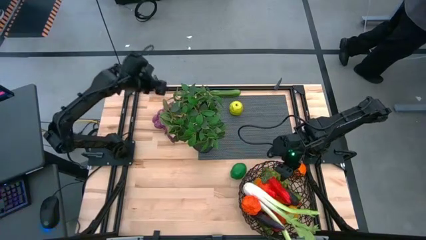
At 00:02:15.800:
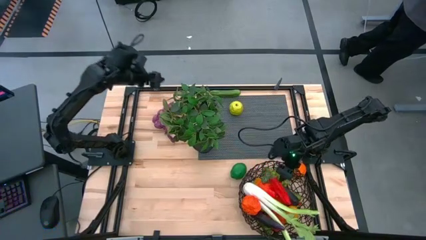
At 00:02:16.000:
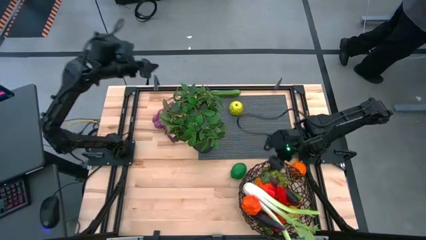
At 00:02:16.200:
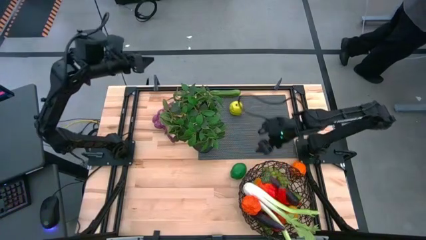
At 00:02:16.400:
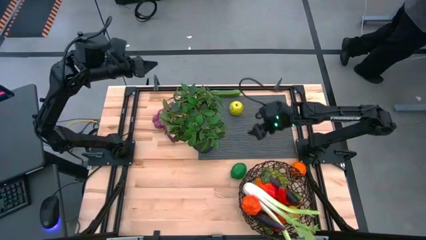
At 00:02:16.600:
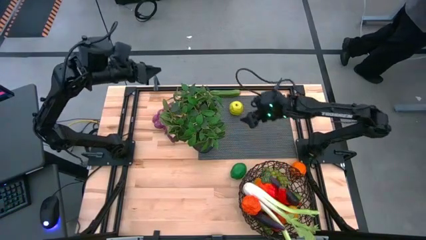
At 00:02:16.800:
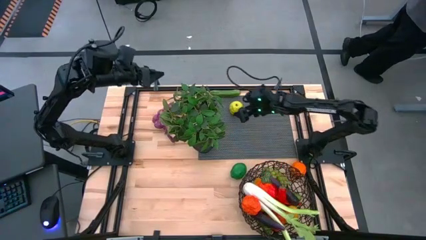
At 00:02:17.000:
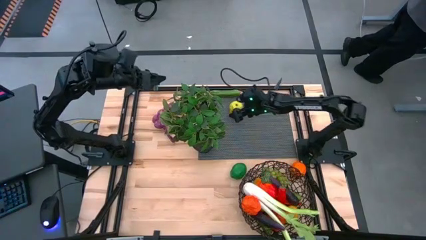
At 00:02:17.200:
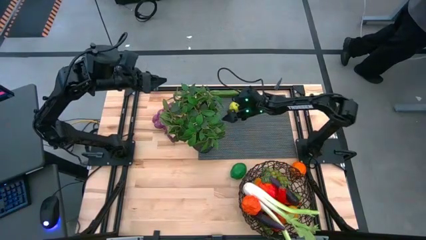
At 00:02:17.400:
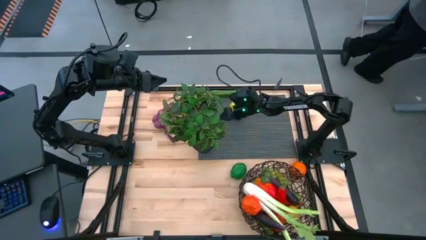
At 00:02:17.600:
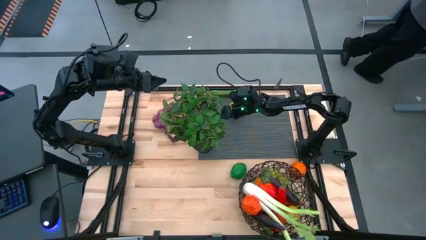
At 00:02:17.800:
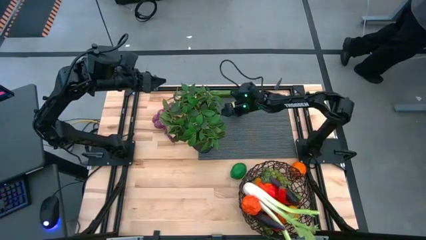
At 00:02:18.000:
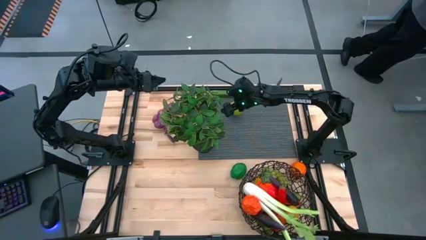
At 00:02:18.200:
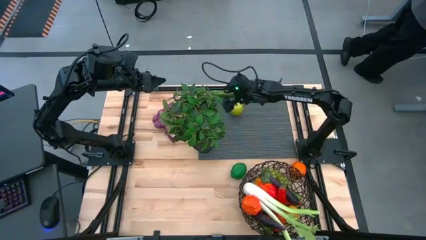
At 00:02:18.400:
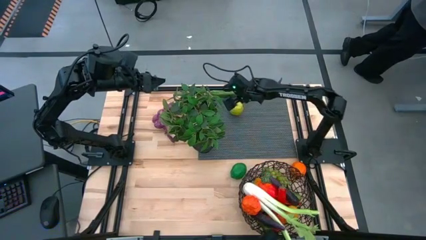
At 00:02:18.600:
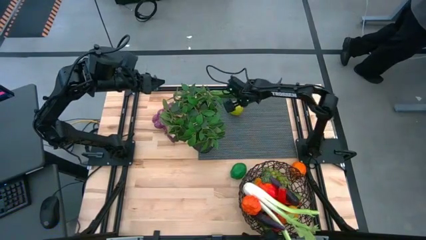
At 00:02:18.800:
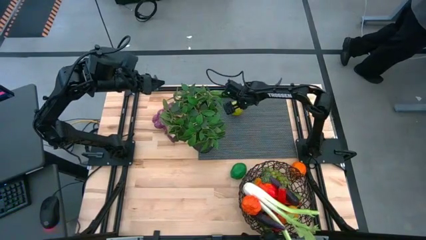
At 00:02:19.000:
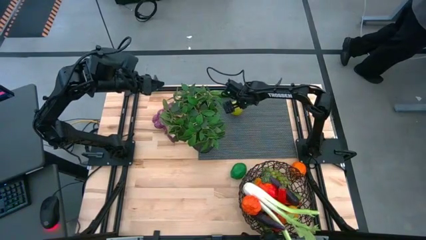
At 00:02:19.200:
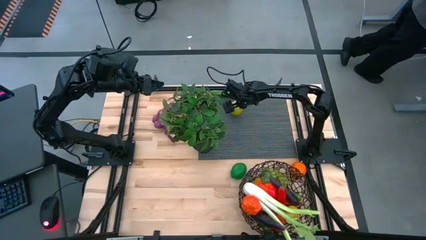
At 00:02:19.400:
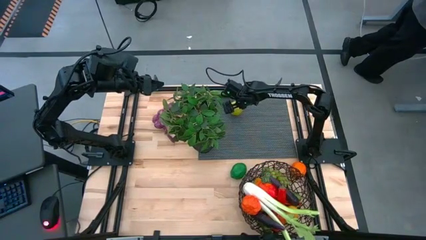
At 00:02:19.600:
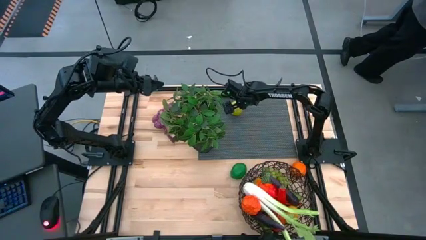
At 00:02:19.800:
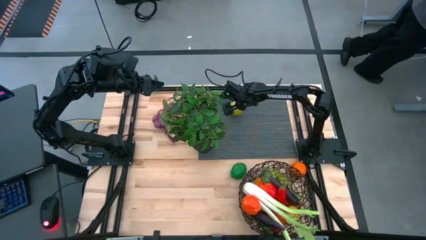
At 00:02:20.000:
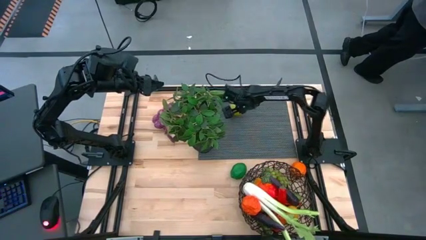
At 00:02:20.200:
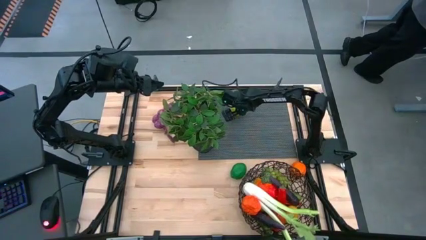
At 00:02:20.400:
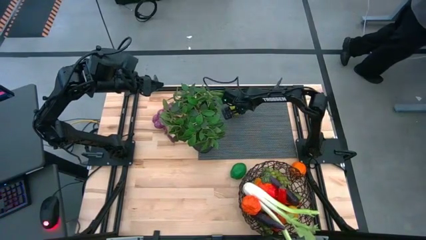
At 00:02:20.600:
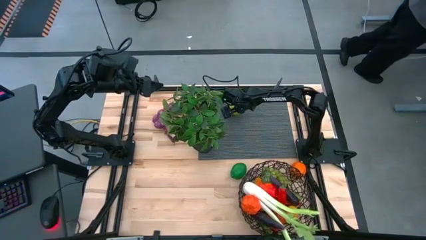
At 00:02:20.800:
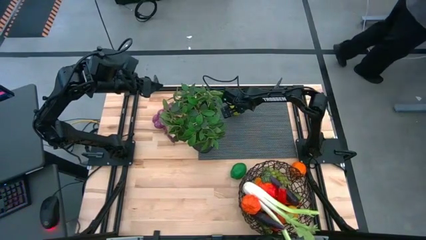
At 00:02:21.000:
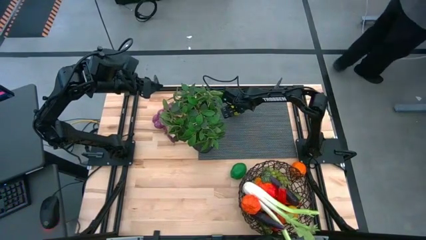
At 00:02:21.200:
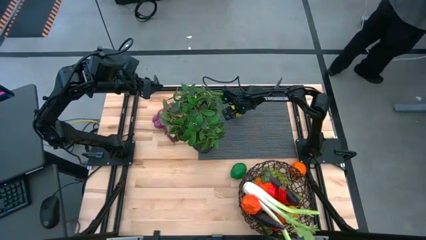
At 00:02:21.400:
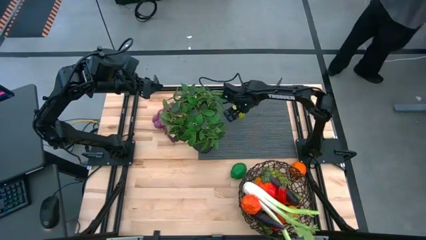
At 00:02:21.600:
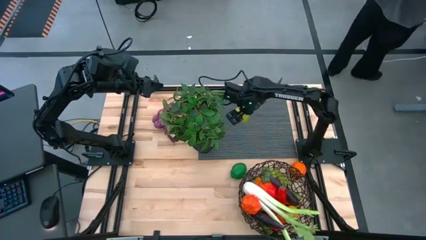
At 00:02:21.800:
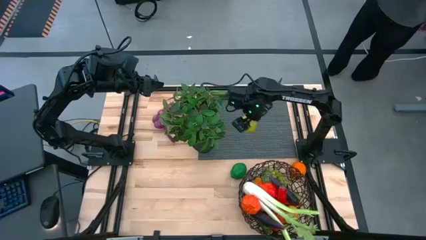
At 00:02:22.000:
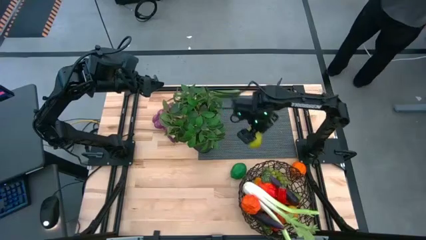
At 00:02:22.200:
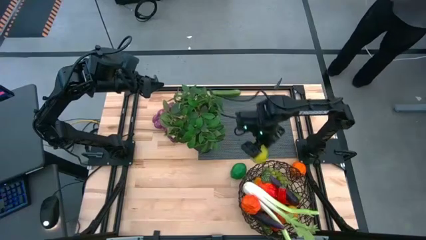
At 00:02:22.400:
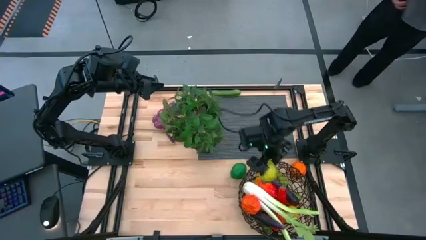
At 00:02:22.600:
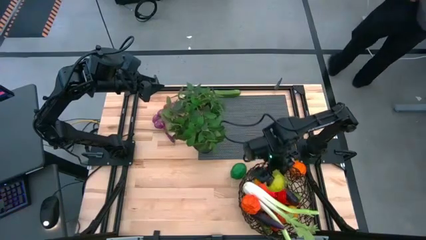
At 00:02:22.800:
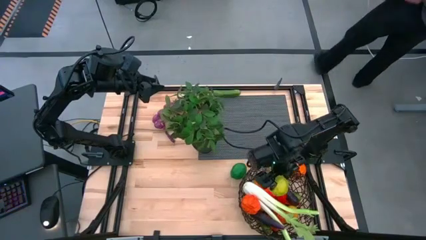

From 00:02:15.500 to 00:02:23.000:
Task: Build produce basket
Put the yellow lemon into the brown wire basket

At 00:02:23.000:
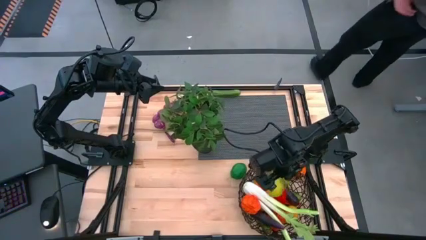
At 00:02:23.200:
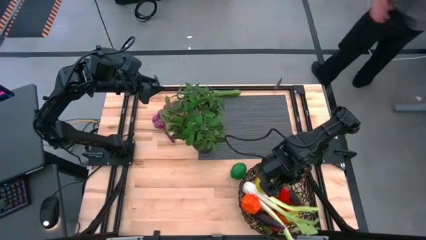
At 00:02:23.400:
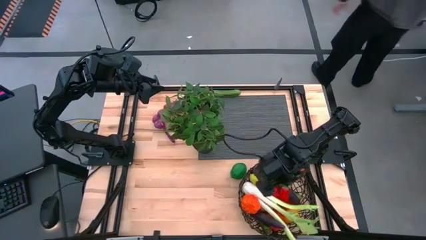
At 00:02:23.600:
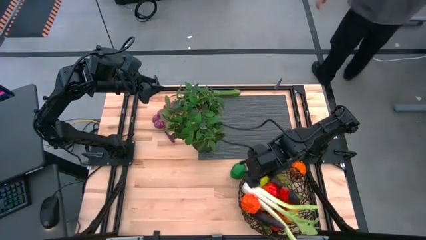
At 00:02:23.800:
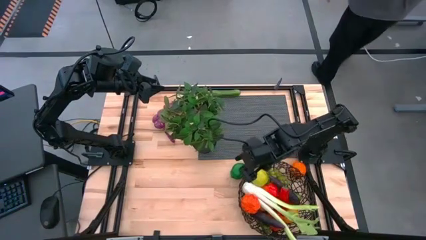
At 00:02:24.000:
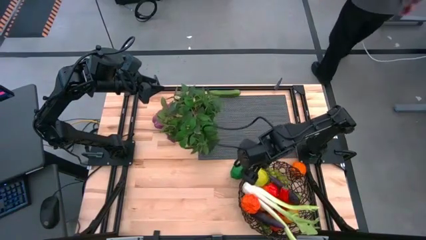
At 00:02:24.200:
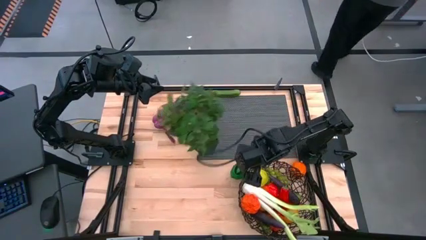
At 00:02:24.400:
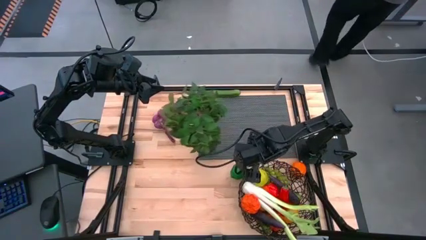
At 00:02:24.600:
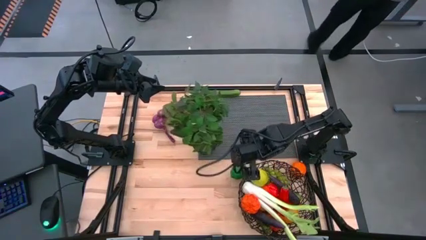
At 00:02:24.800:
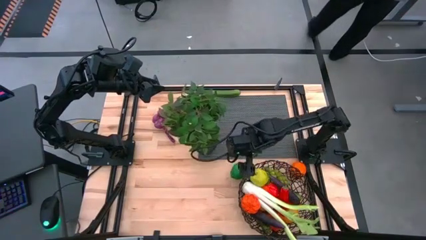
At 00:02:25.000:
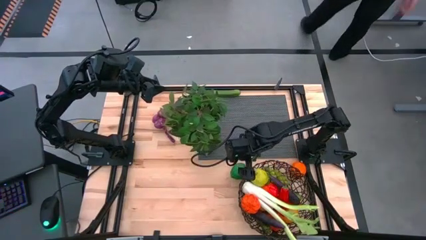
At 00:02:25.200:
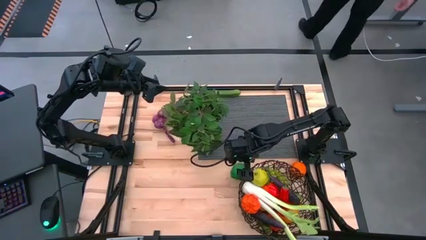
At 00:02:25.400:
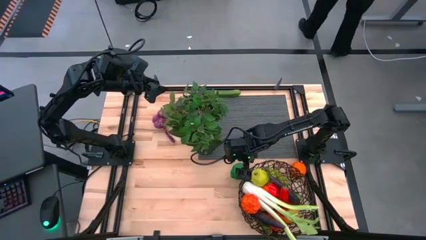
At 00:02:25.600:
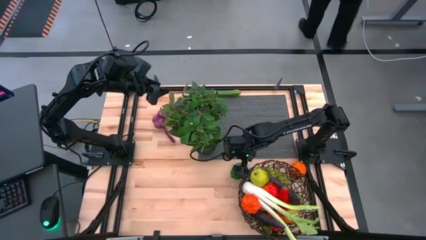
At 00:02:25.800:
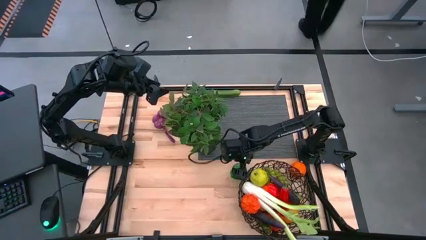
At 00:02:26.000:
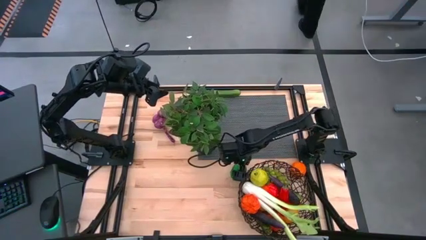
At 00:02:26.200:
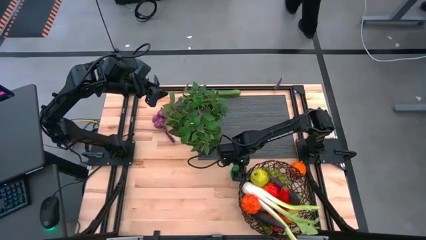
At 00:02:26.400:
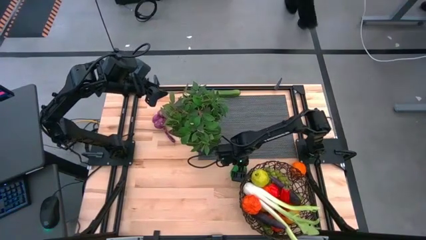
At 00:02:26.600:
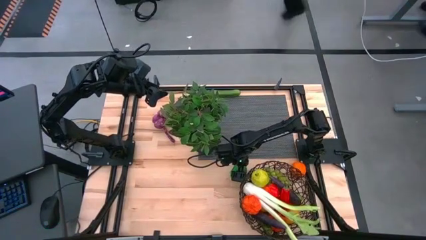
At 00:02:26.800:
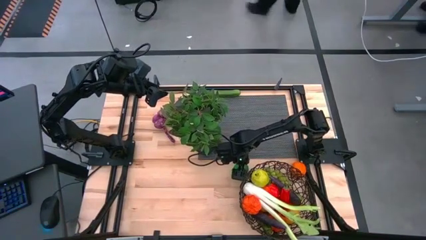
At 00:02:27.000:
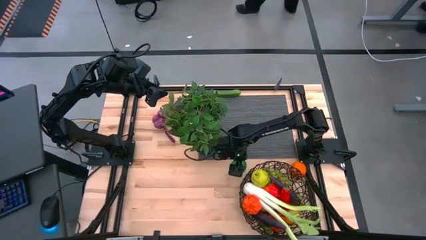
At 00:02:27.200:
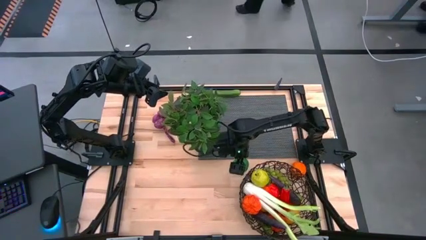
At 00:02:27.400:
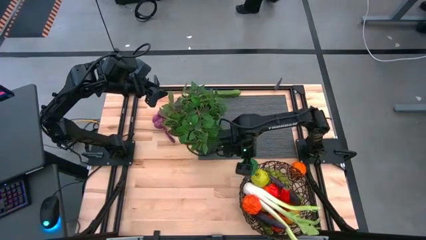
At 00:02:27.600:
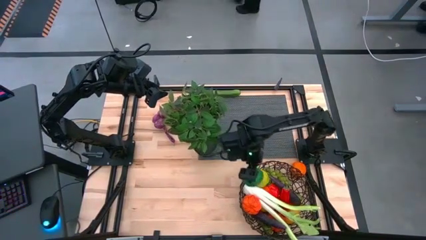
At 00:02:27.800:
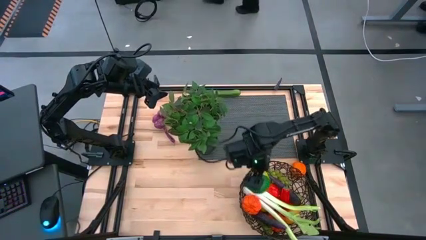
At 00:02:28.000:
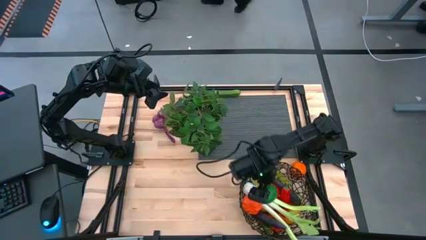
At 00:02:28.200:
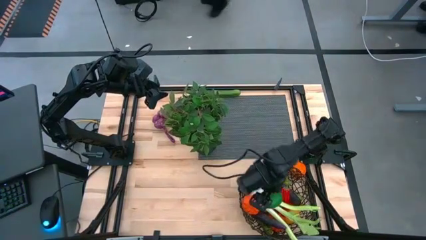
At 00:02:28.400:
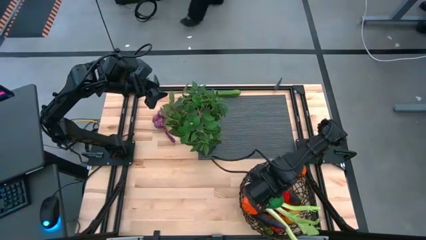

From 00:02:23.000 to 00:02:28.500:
Put the green lime into the brown wire basket

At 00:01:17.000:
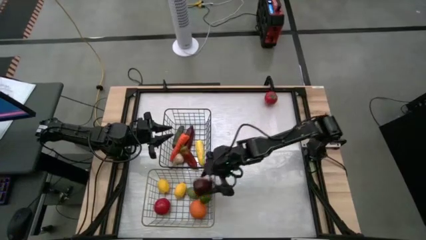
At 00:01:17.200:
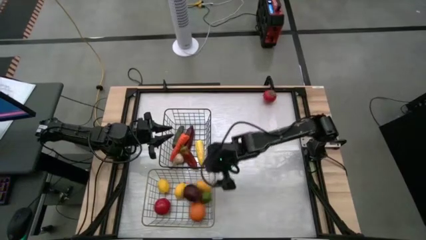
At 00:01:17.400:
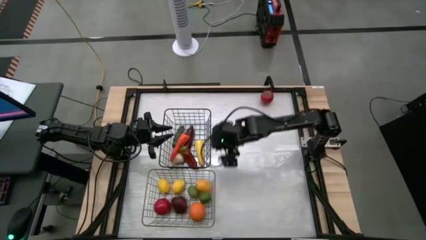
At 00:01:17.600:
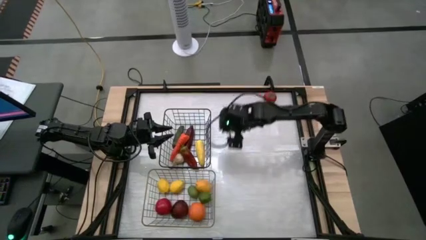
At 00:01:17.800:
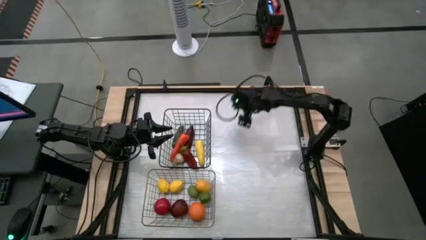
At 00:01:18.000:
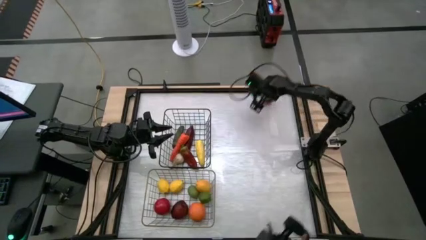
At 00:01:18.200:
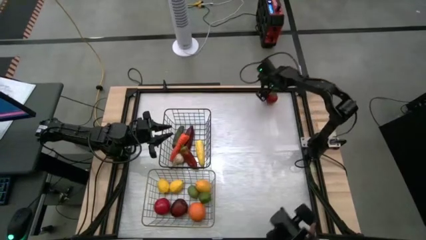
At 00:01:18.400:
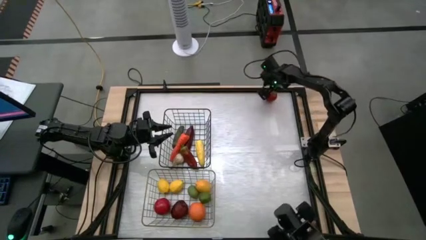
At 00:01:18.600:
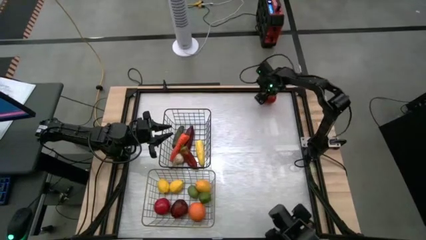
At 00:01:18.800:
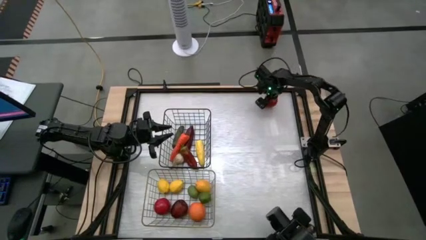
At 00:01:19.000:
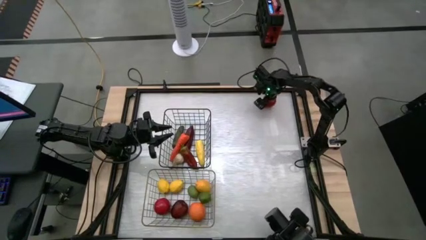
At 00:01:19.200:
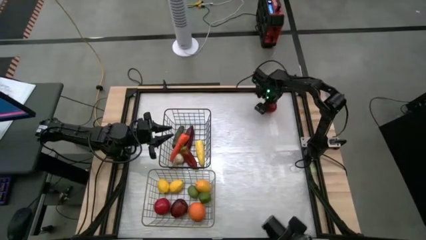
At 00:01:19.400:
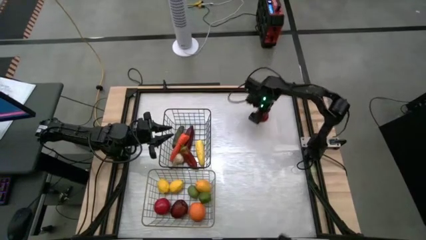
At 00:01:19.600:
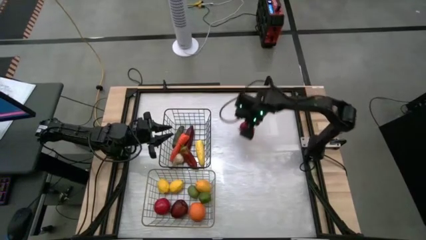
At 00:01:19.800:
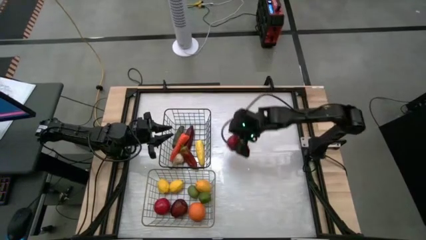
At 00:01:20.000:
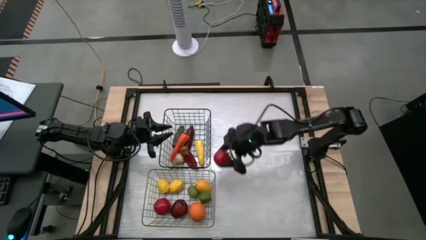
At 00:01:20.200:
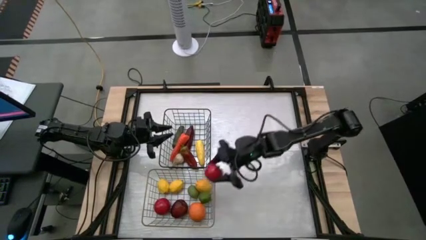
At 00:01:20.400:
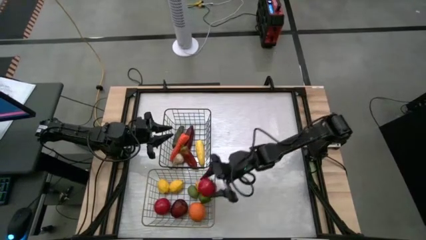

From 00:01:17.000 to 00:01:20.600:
Task: Sort produce into baskets
Put the tomato into the silver wire basket
